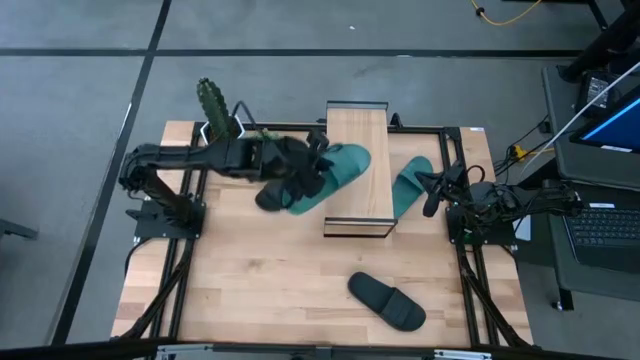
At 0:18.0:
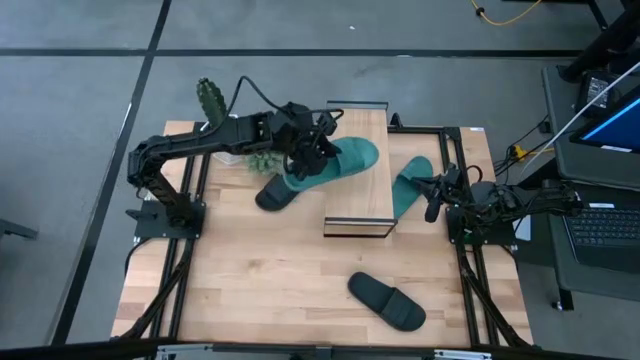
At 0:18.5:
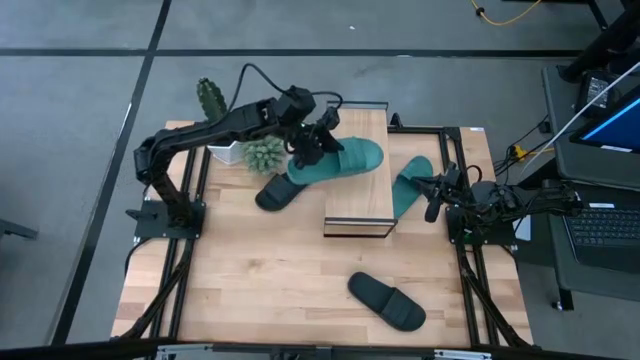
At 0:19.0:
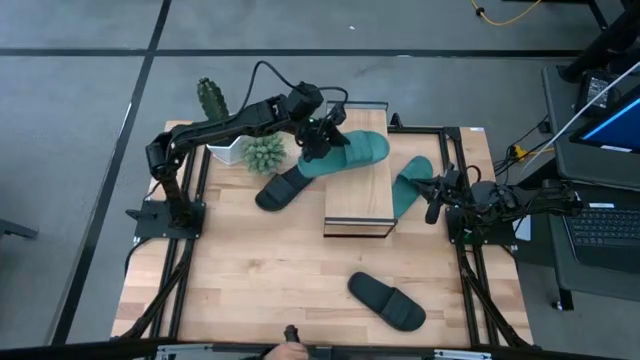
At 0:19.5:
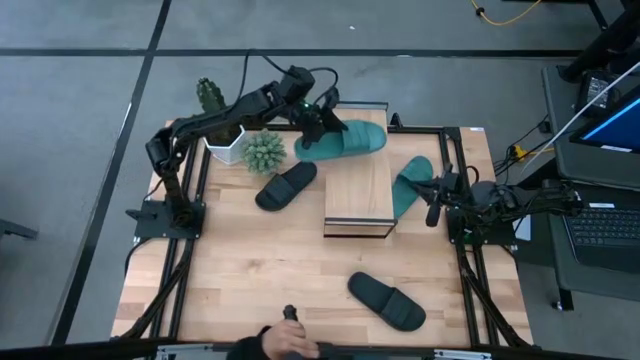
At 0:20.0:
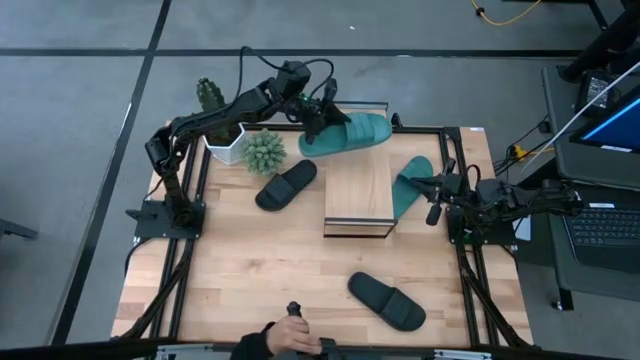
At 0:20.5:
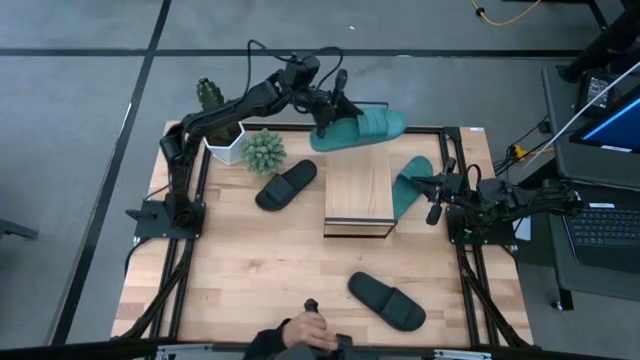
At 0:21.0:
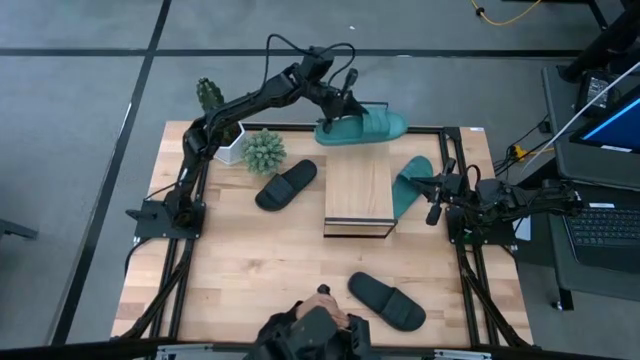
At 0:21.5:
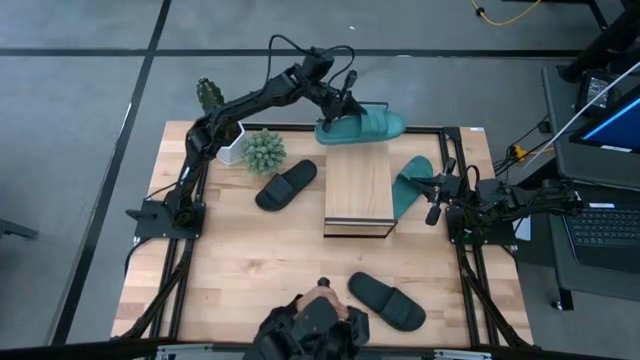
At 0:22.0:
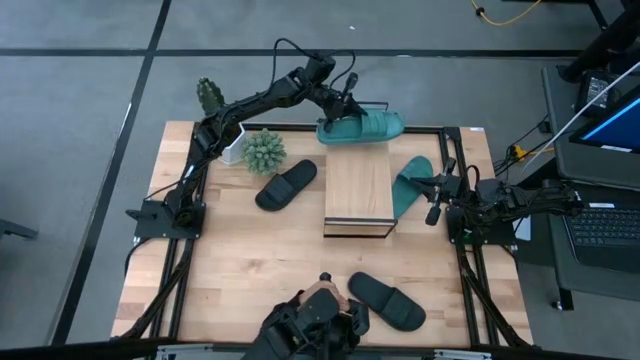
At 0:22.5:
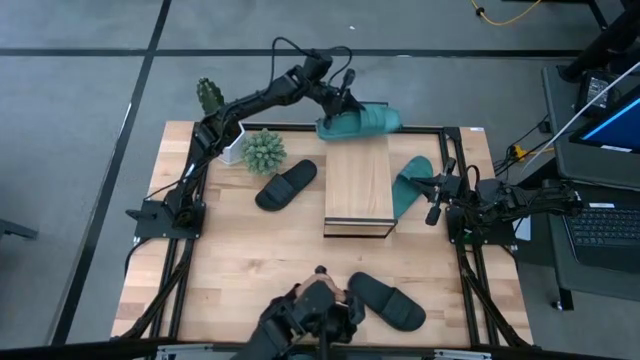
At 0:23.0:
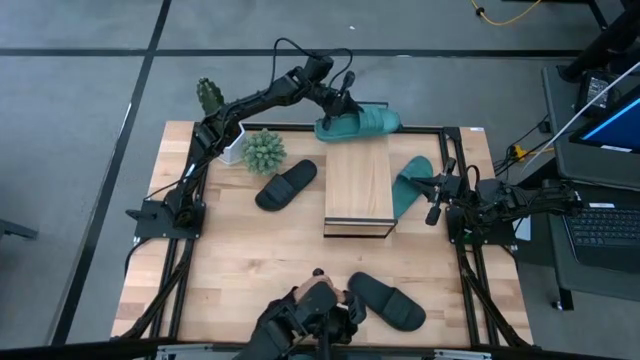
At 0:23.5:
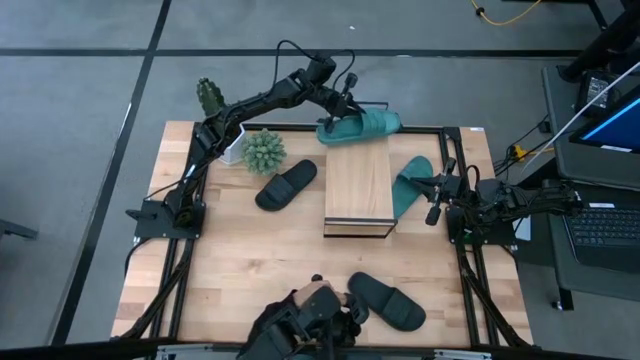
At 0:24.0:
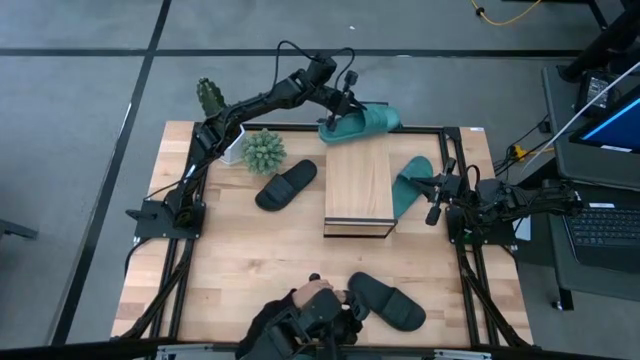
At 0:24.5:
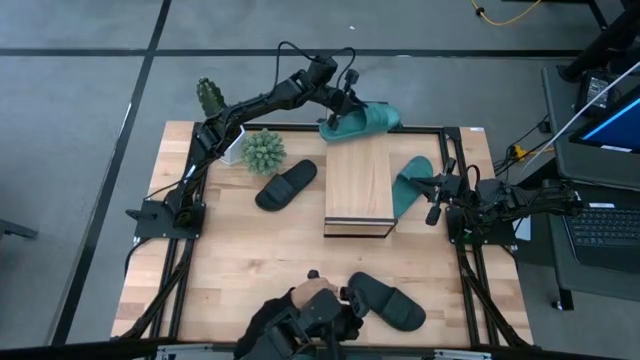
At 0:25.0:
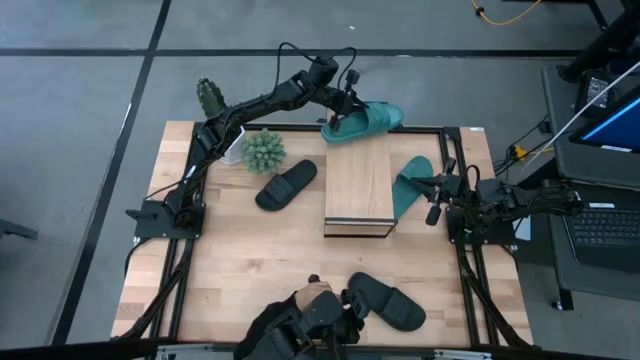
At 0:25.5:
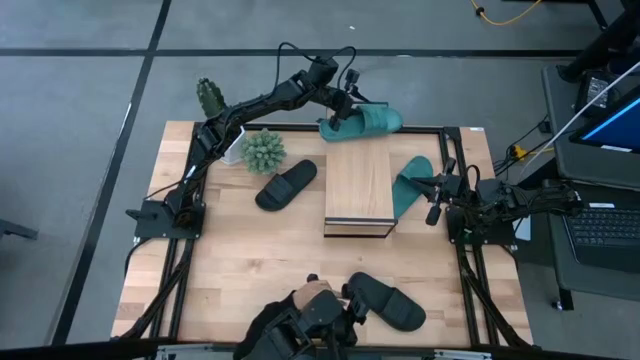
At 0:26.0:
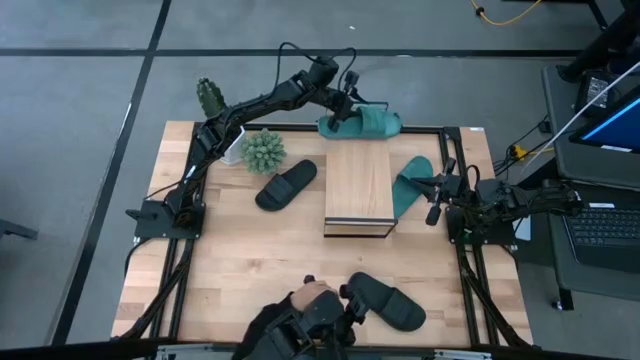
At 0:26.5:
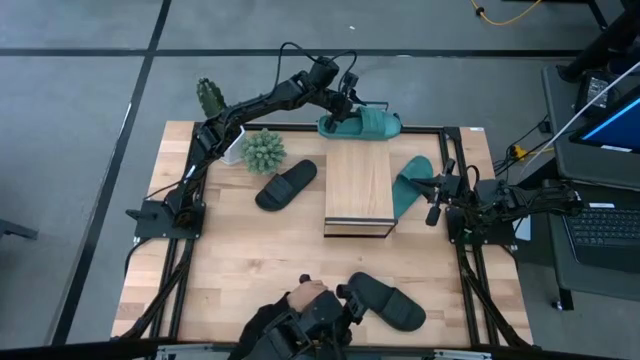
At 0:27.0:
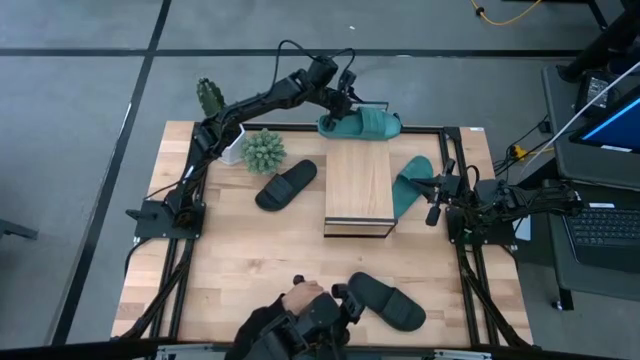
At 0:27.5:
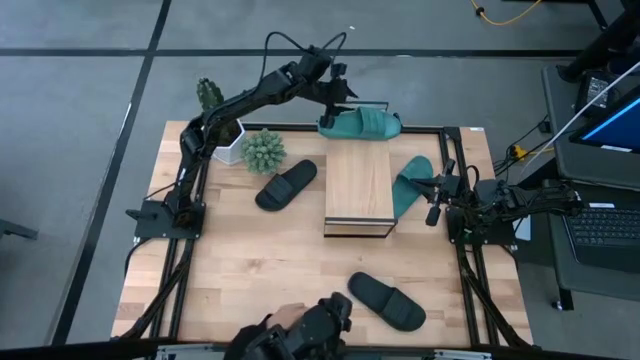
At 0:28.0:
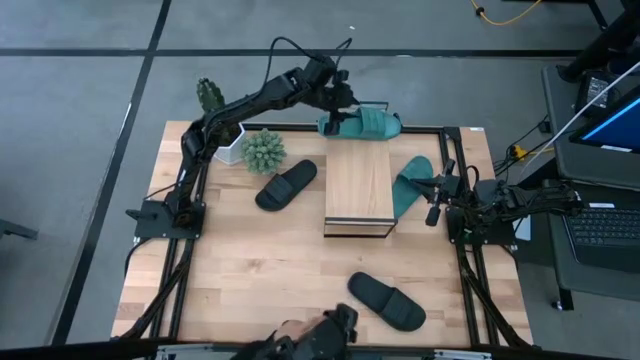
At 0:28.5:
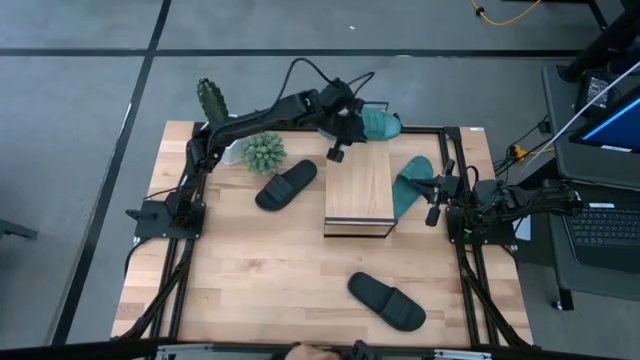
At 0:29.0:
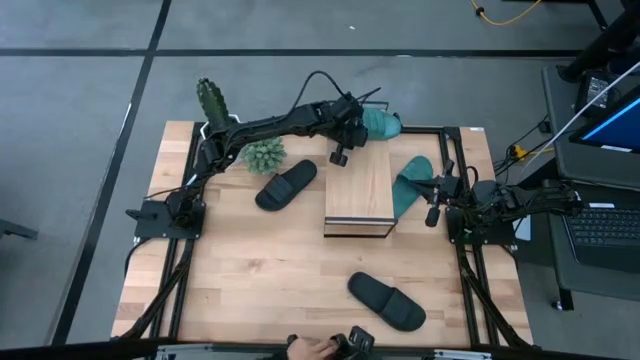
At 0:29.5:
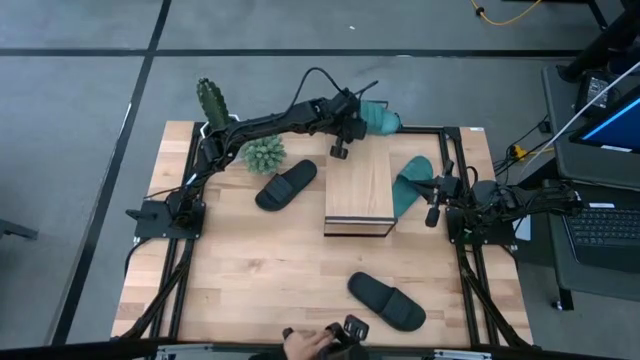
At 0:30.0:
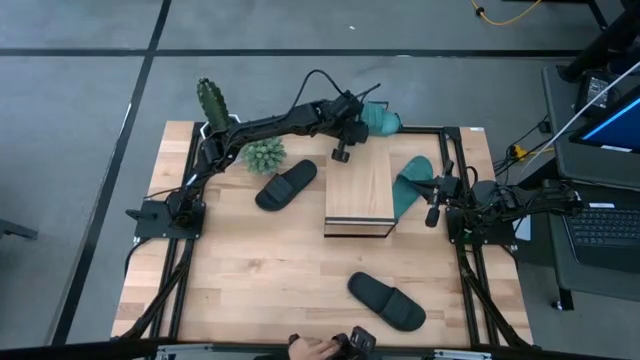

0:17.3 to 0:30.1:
Task: Pick and place slides into the shelf
Put the bottom green slide on the shelf

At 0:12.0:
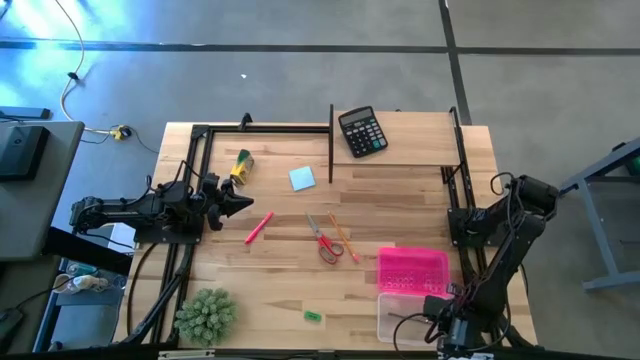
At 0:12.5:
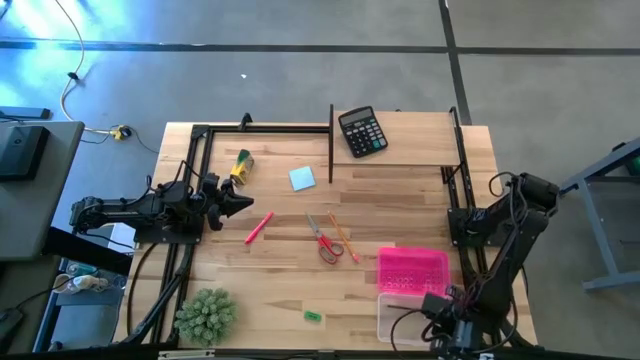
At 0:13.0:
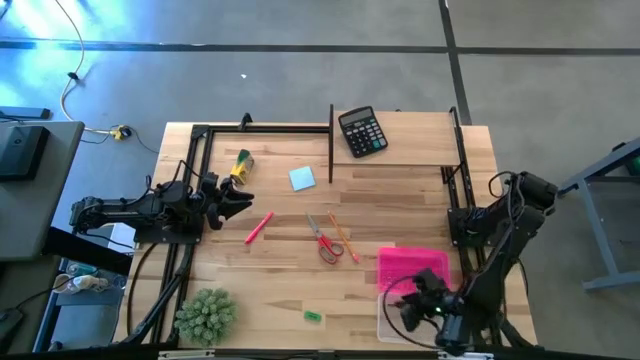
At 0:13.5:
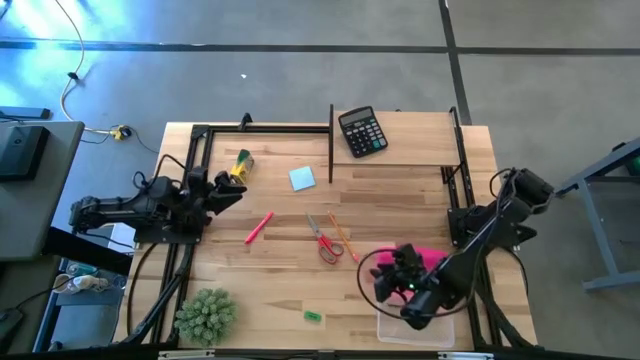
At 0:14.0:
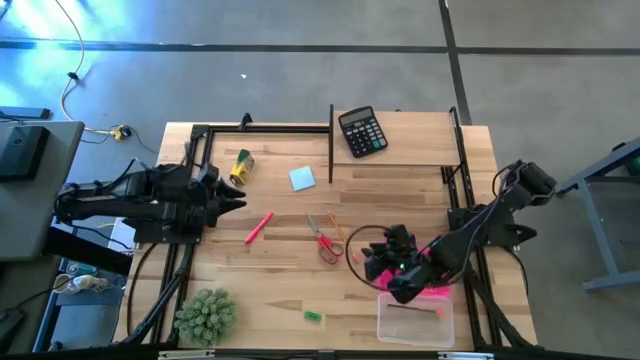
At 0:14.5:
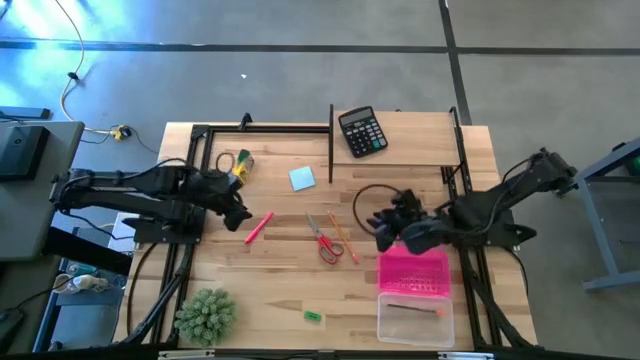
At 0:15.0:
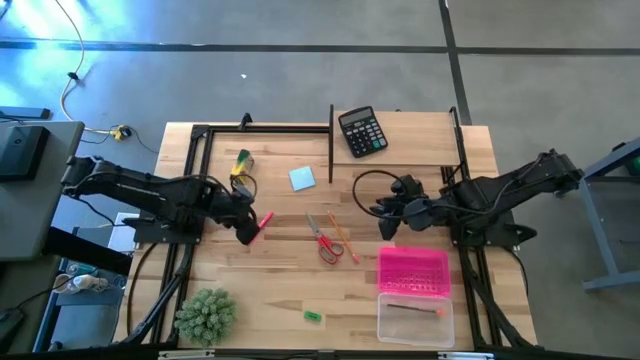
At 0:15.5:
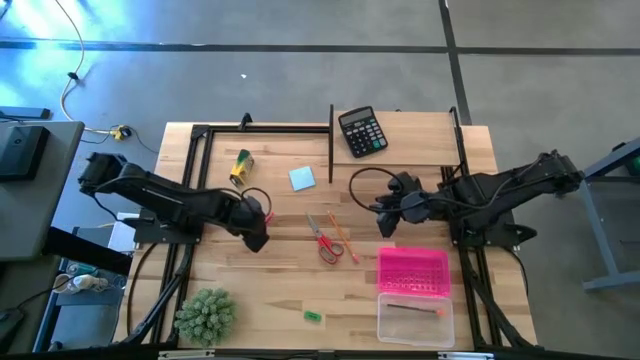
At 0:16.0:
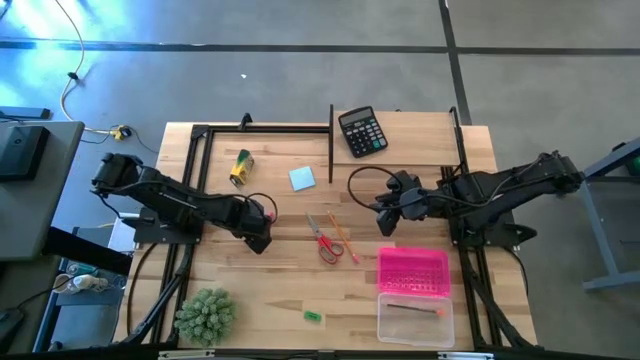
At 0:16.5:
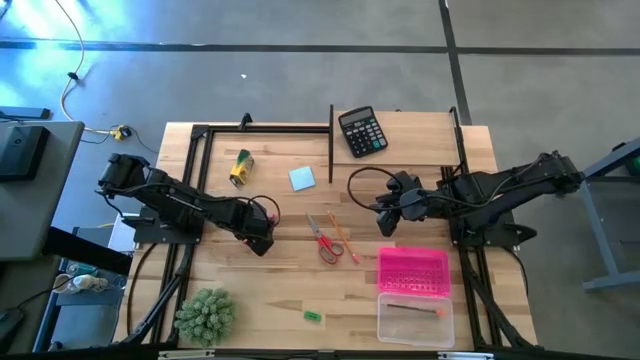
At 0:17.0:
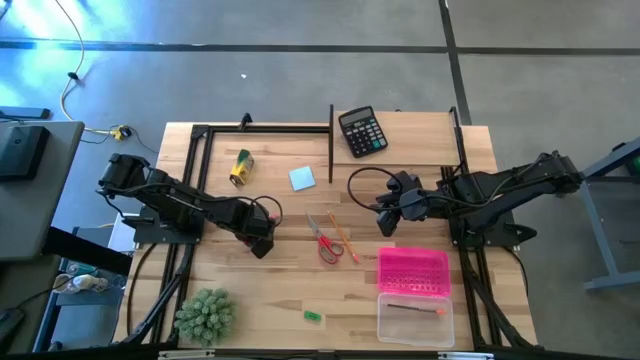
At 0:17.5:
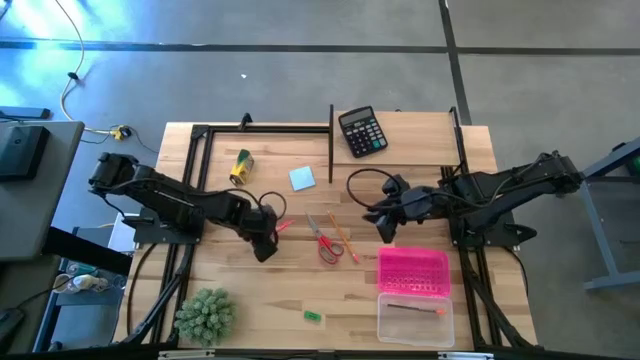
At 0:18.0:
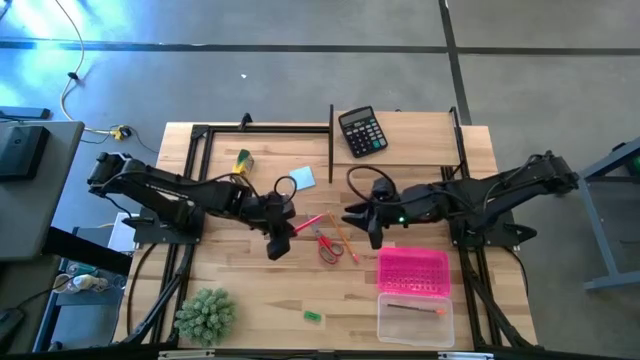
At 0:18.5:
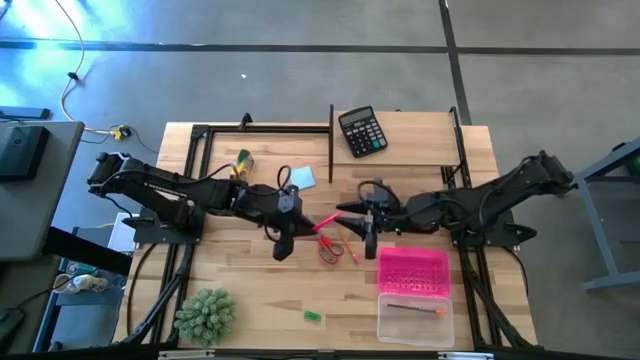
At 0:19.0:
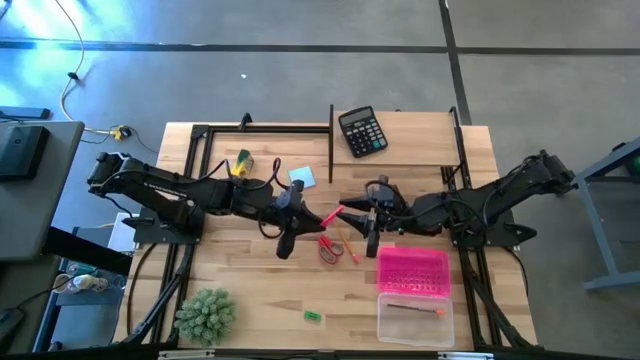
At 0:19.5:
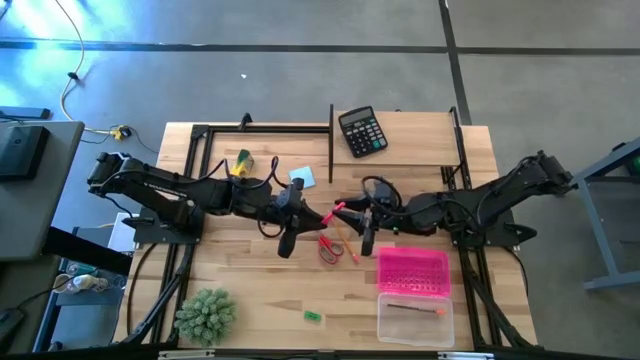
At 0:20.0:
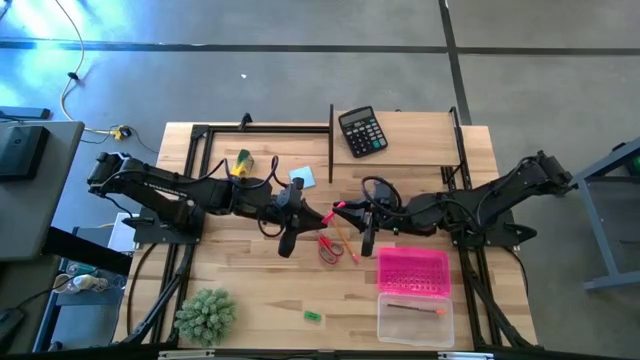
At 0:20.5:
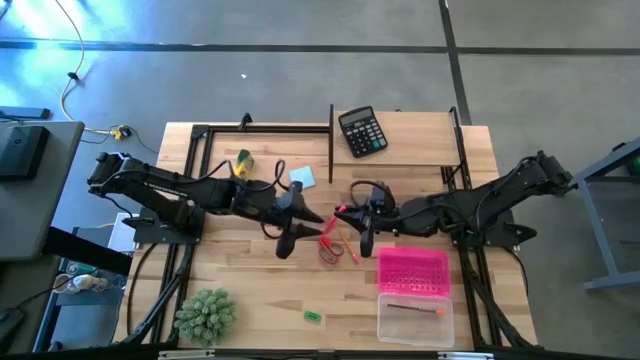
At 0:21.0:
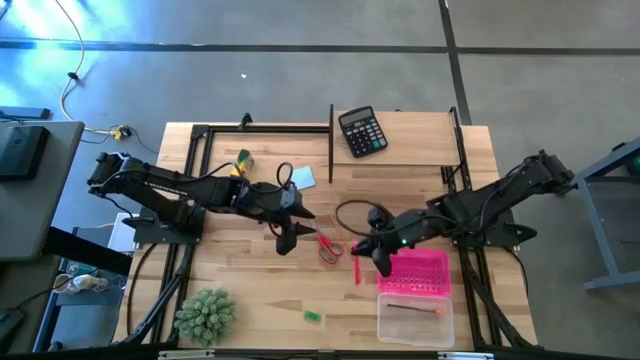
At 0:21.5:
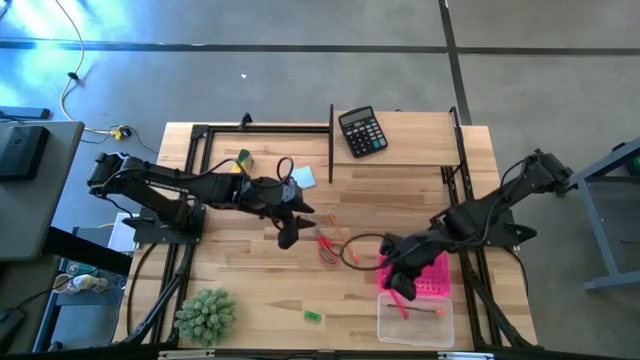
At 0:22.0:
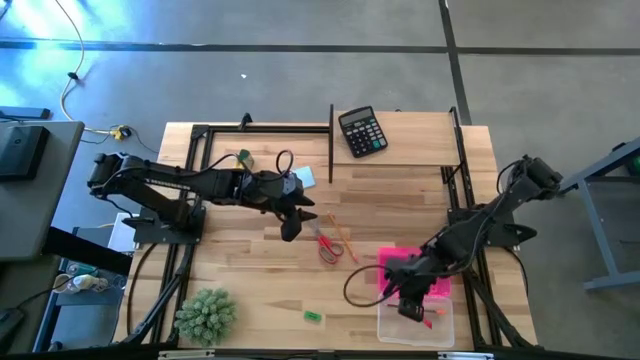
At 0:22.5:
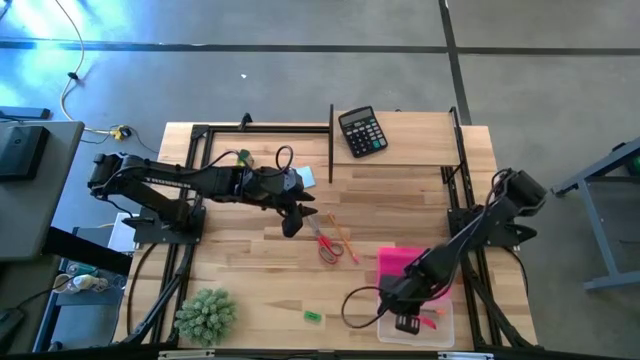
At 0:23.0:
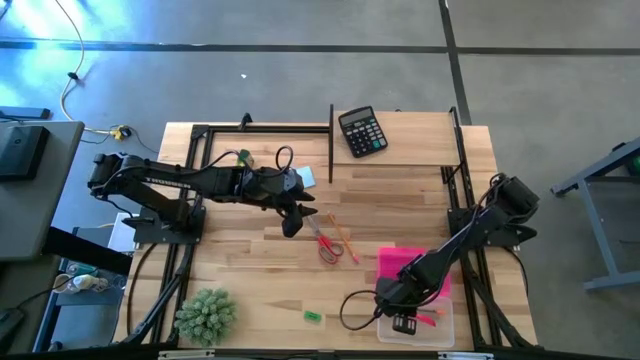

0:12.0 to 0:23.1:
Task: Pack school essentials
Put the pink pen into the supply box
